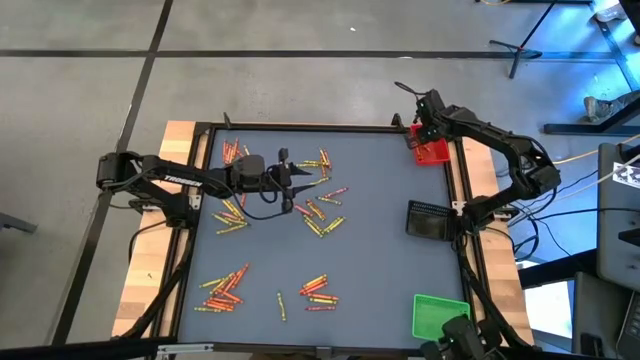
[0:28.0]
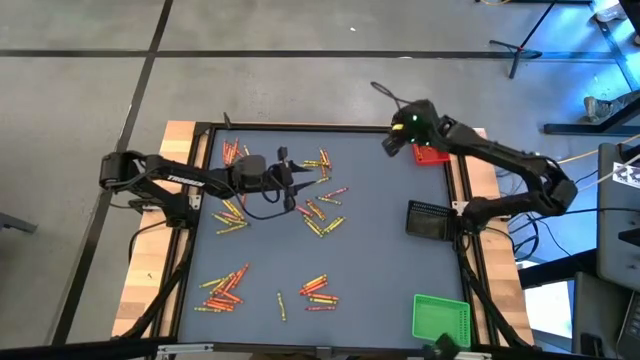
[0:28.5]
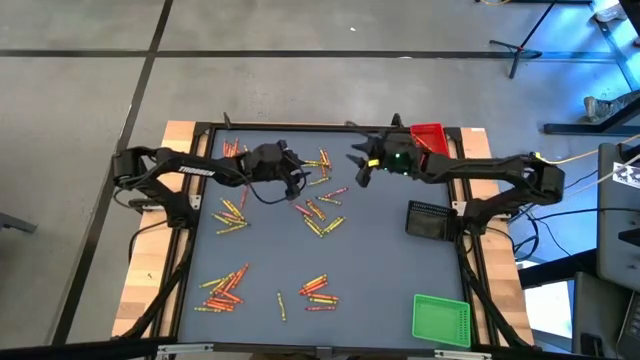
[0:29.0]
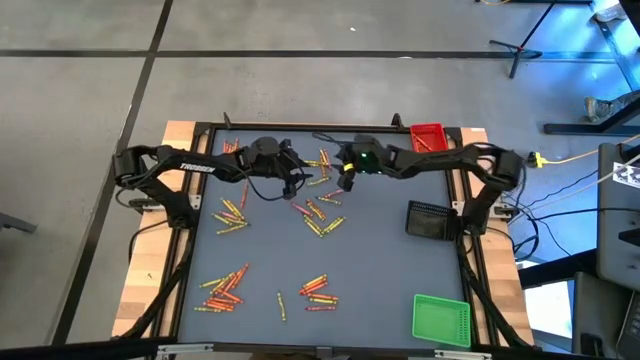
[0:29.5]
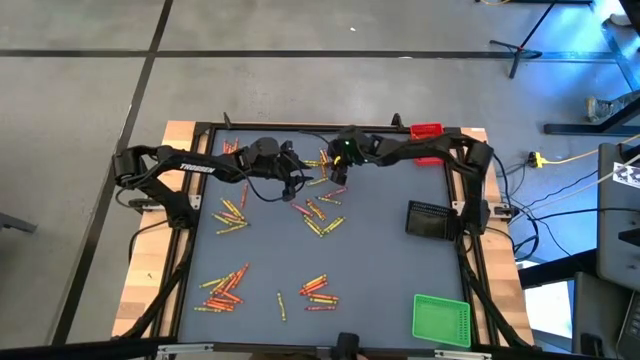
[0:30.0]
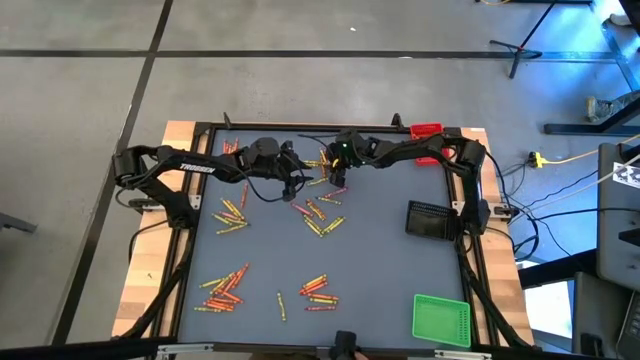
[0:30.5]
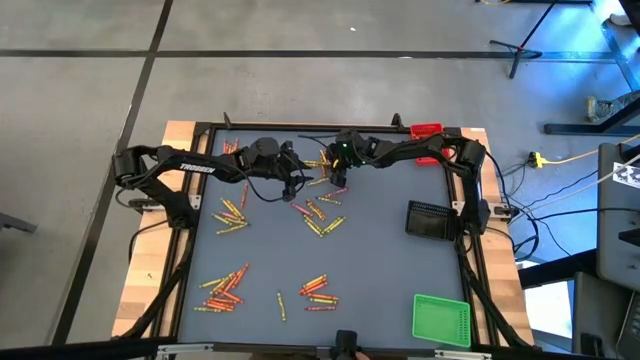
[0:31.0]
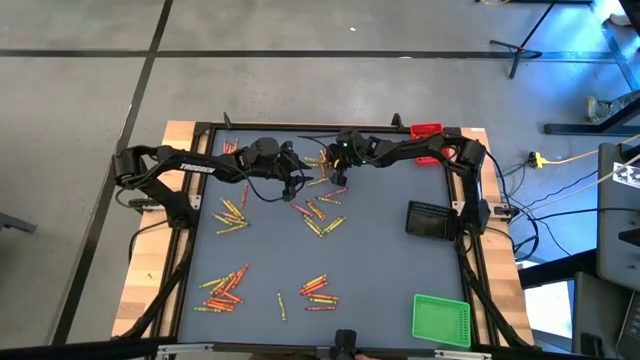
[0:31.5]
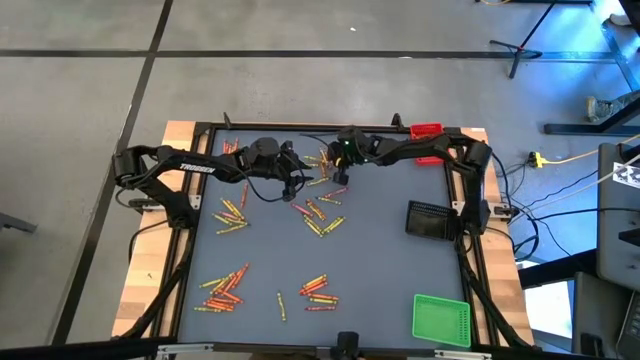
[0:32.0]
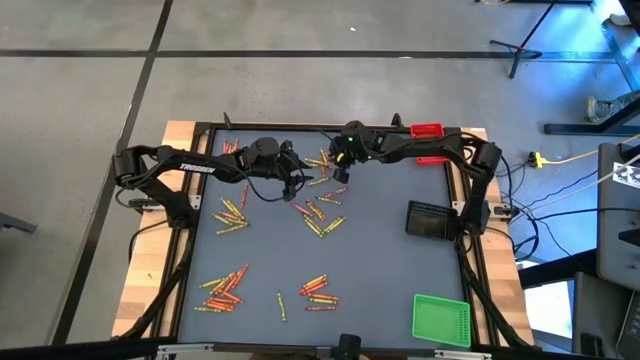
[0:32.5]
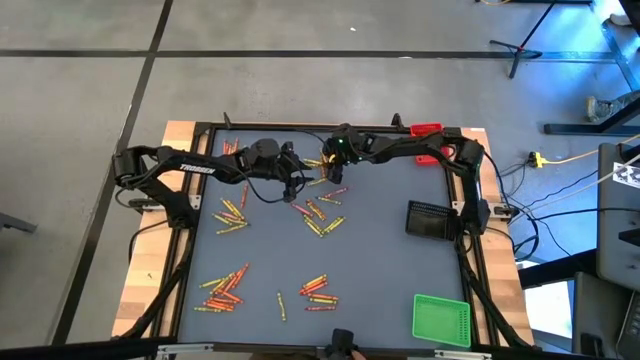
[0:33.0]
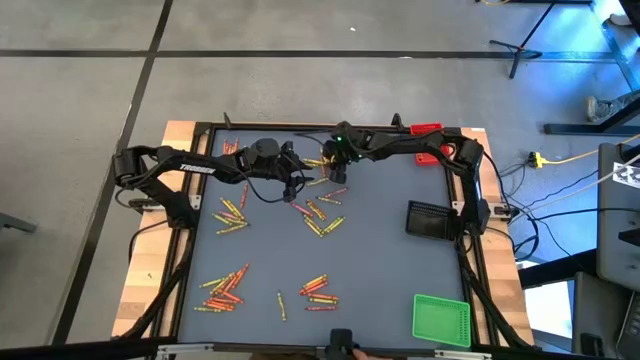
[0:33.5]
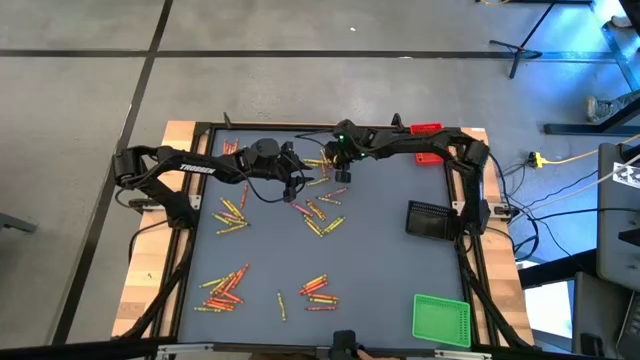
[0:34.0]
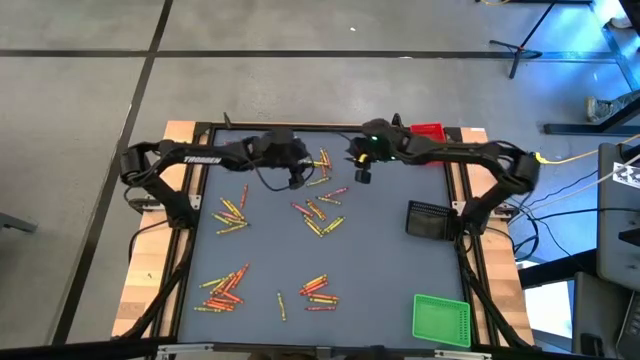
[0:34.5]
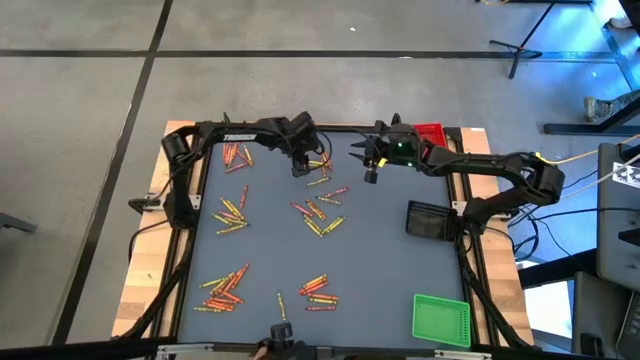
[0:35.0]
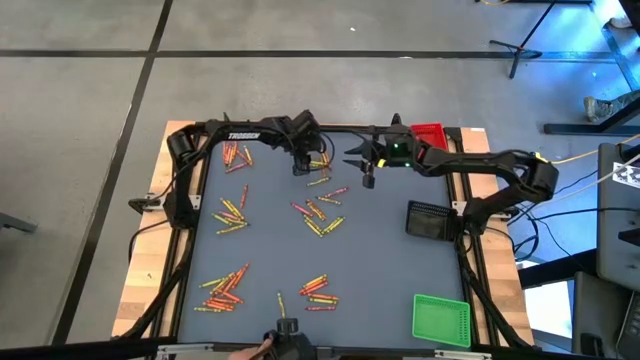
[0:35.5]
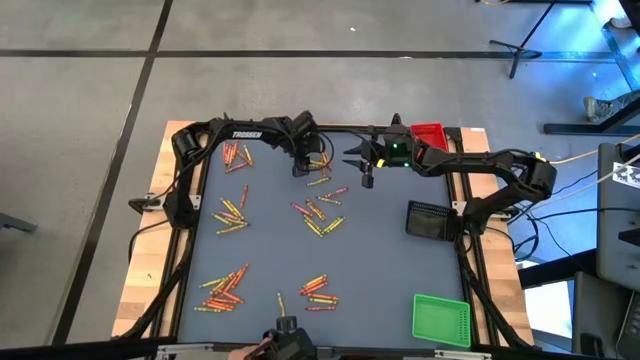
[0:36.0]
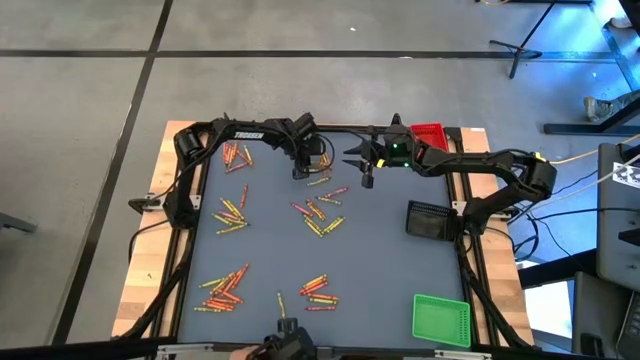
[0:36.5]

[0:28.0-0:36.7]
Task: Sort crayons
Put the yellow crayon into the black basket

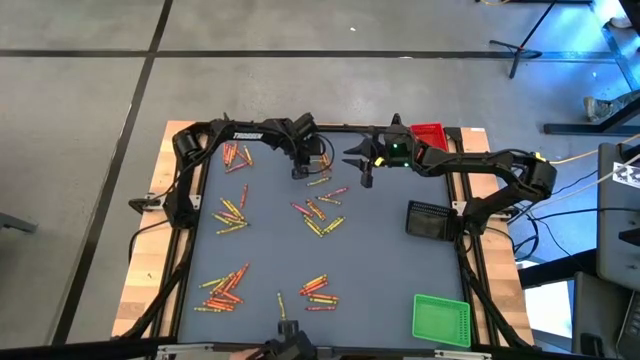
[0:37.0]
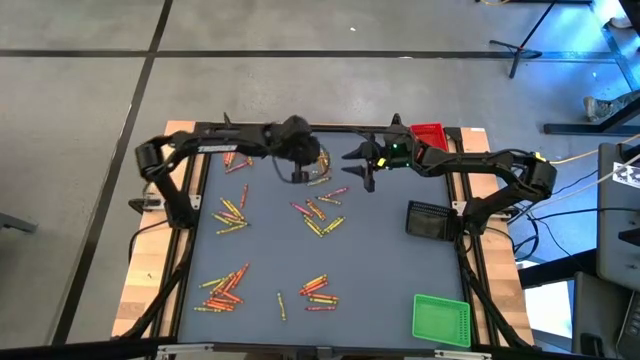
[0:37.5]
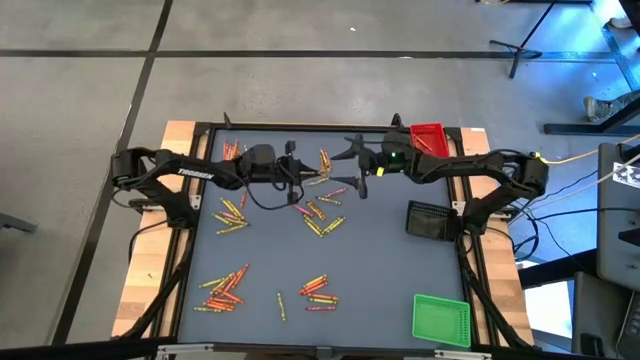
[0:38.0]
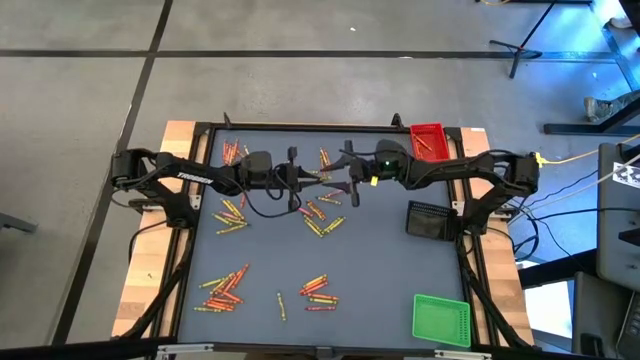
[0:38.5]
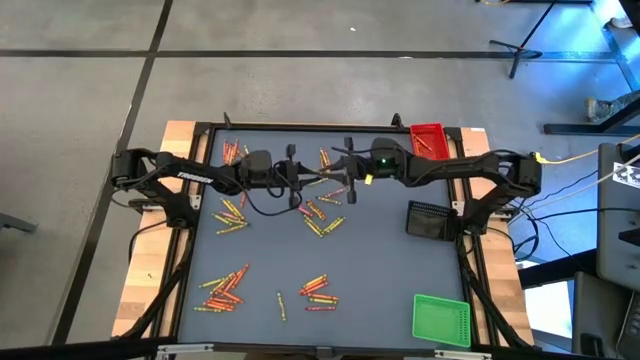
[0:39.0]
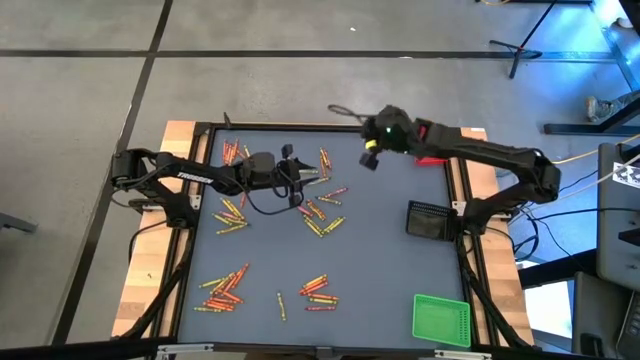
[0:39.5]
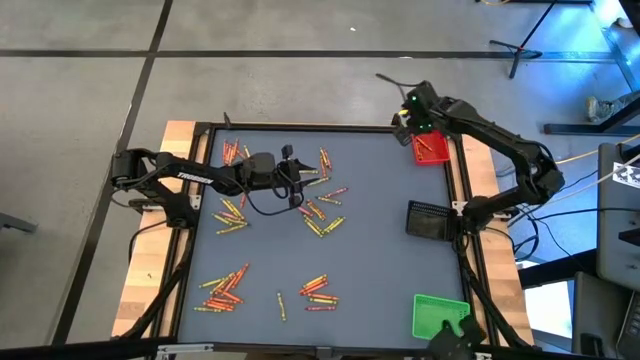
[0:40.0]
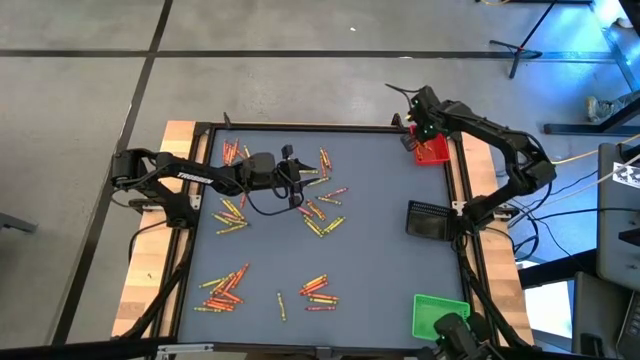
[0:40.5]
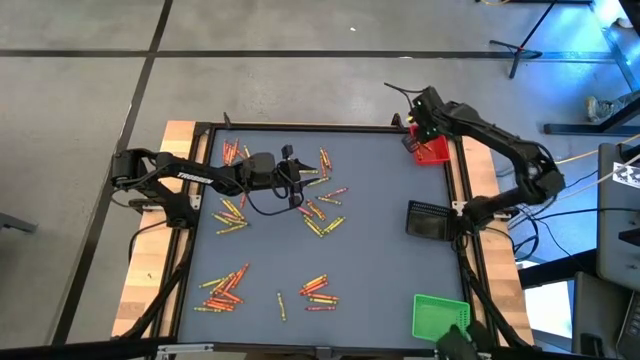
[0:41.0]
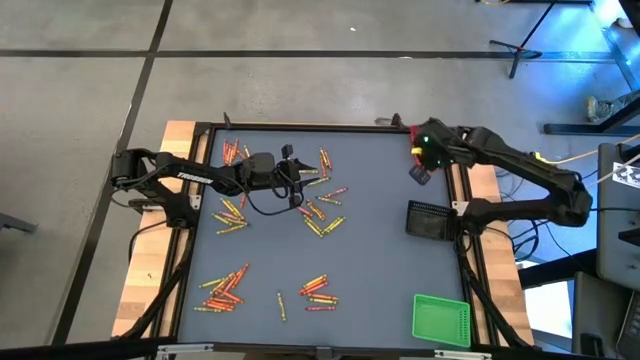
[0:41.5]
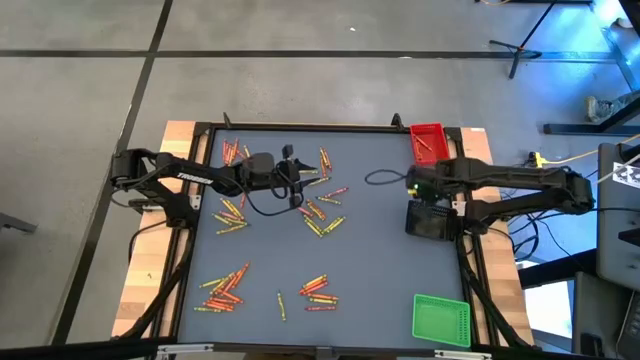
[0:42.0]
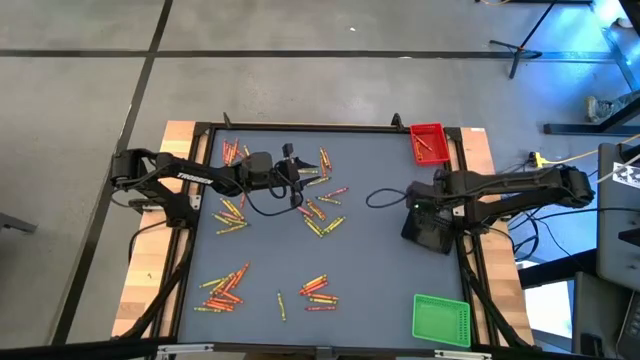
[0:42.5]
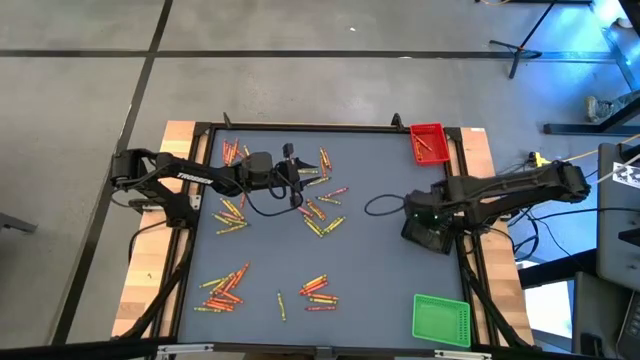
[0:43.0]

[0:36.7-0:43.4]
Put the yellow crayon into the black basket

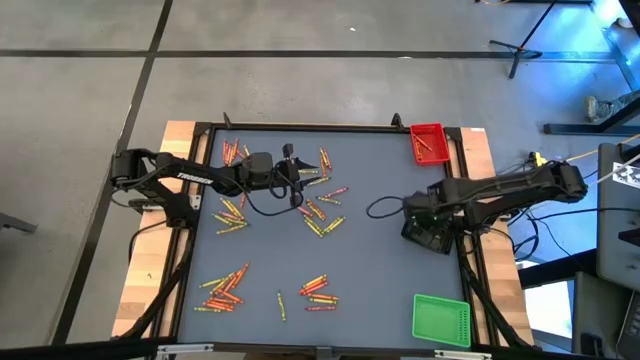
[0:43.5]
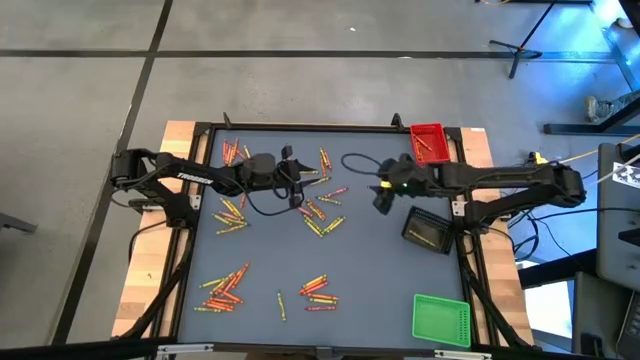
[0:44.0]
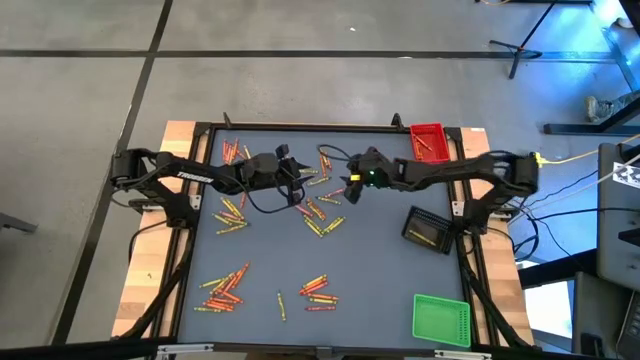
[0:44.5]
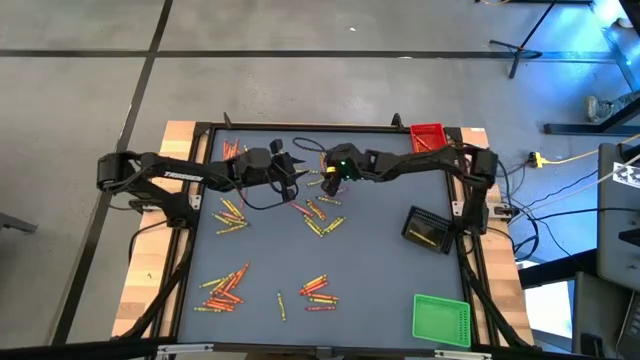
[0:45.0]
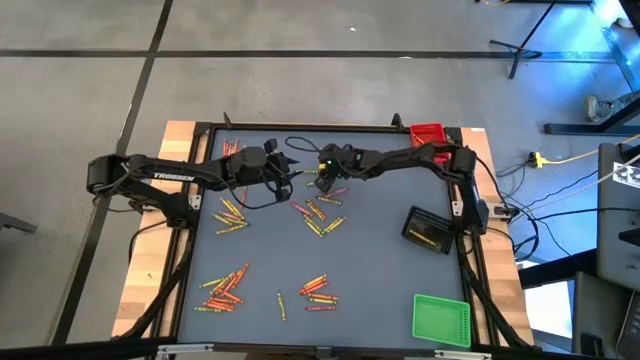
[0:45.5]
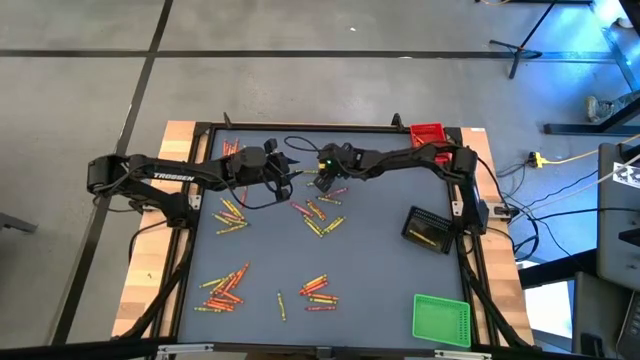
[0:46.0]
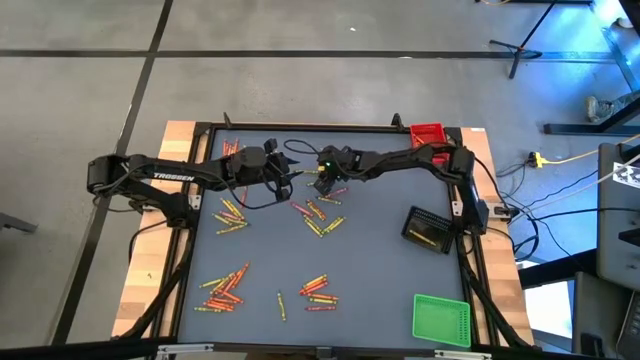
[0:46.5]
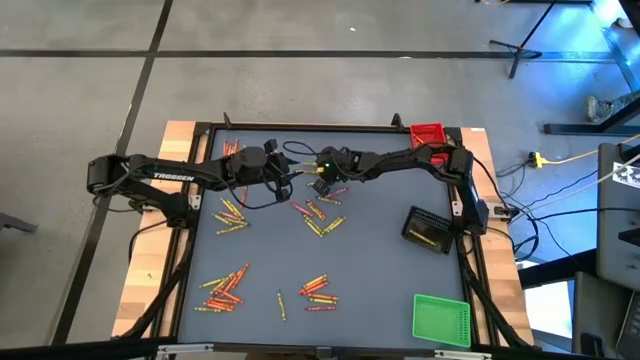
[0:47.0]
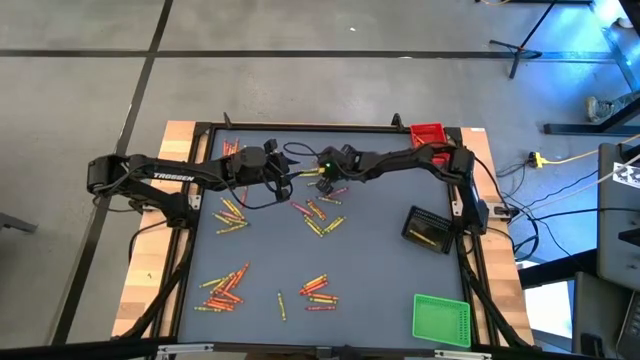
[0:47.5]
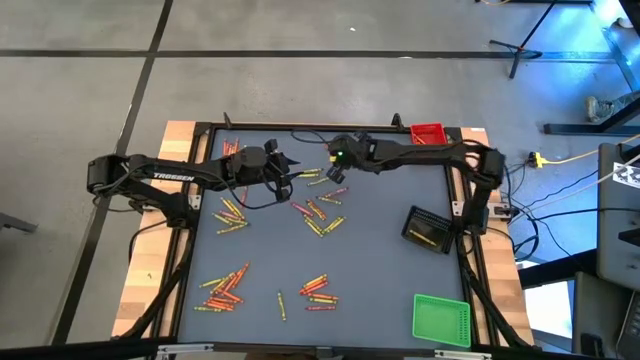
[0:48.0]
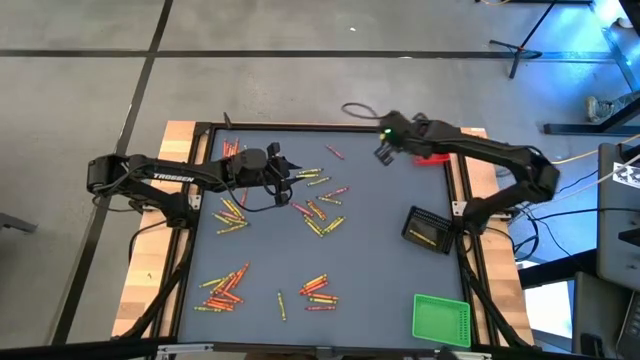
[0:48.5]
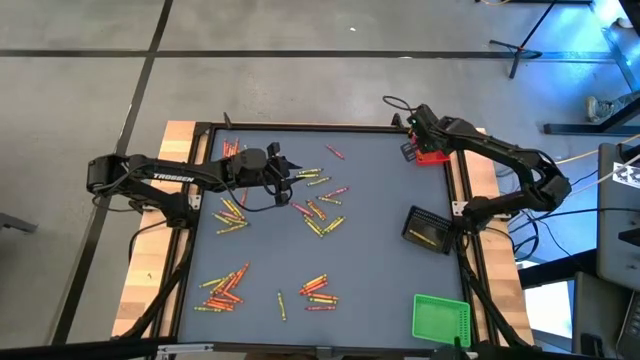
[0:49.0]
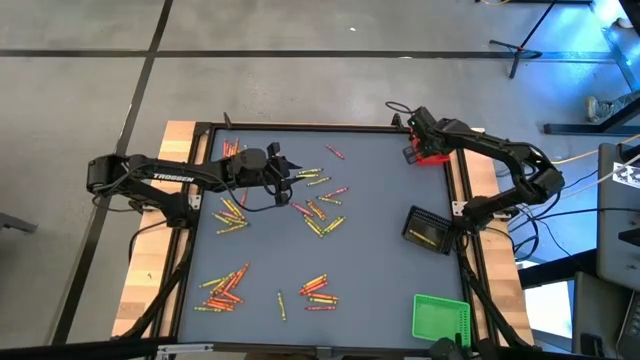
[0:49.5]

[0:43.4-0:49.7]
Put the orange crayon into the red basket
